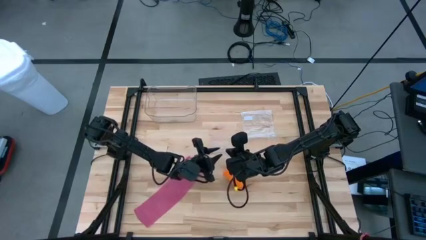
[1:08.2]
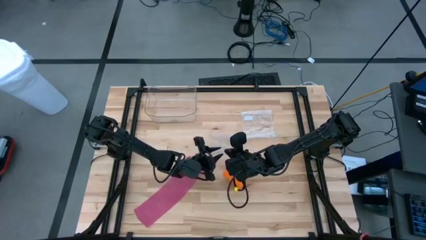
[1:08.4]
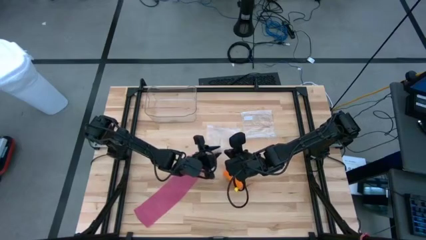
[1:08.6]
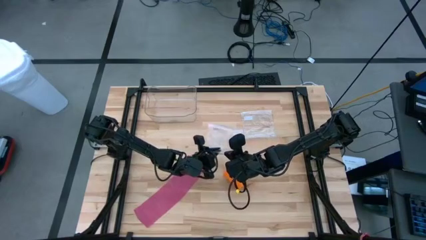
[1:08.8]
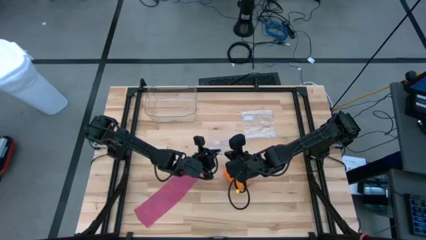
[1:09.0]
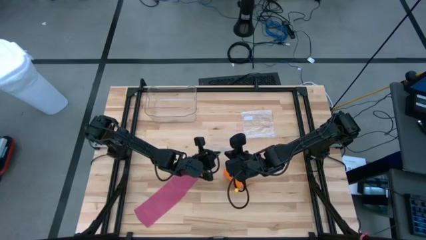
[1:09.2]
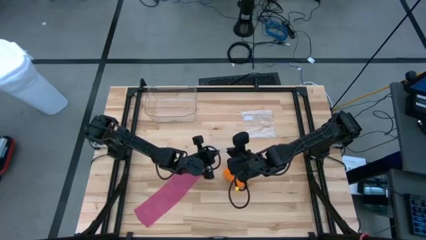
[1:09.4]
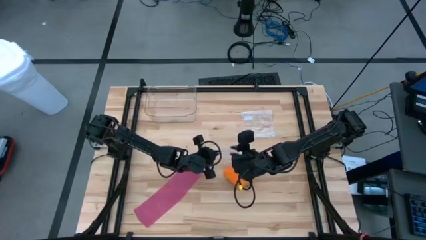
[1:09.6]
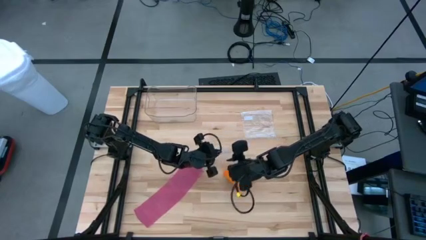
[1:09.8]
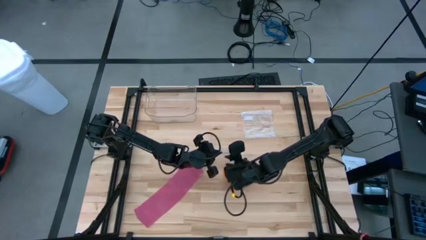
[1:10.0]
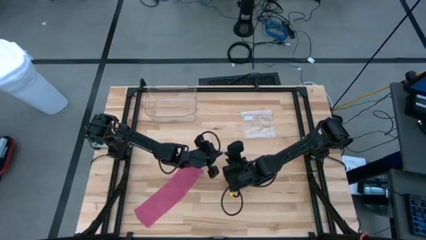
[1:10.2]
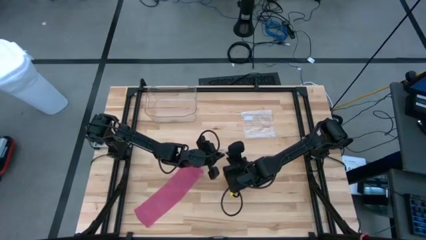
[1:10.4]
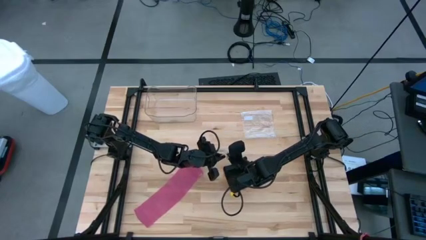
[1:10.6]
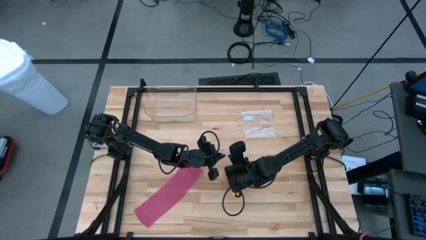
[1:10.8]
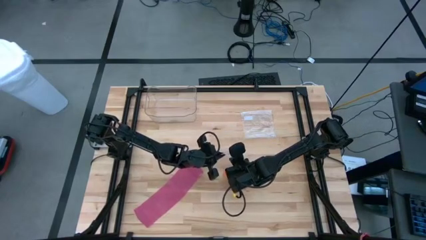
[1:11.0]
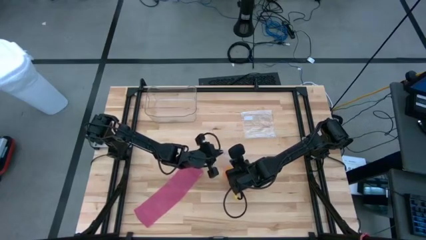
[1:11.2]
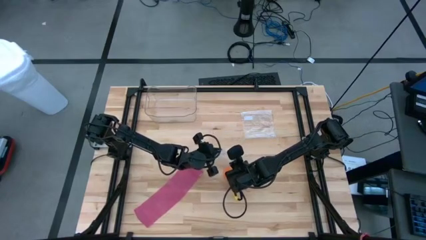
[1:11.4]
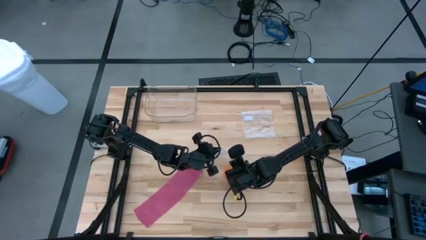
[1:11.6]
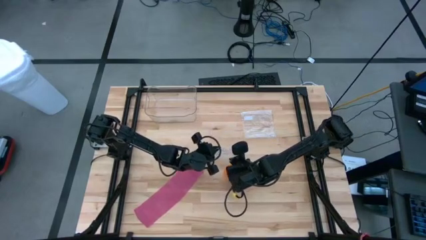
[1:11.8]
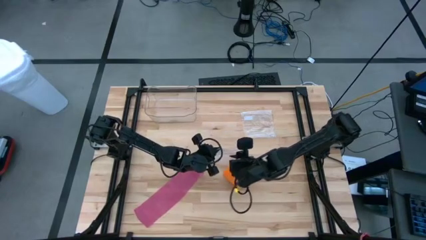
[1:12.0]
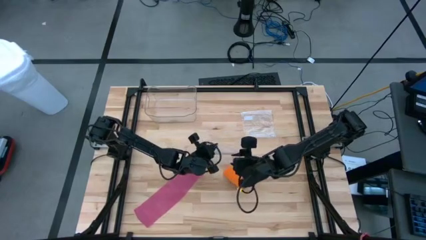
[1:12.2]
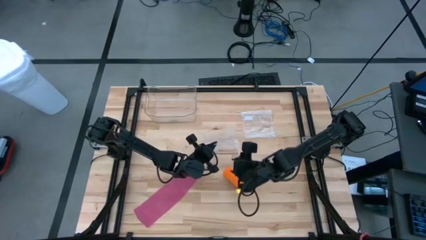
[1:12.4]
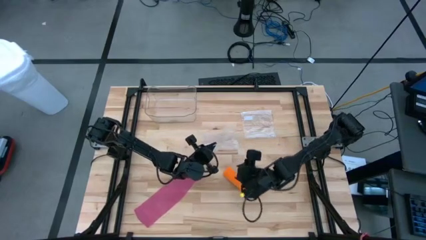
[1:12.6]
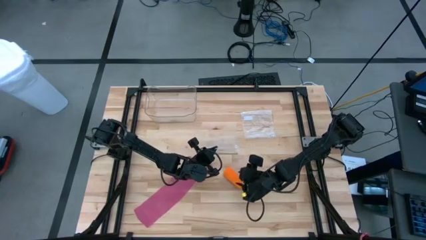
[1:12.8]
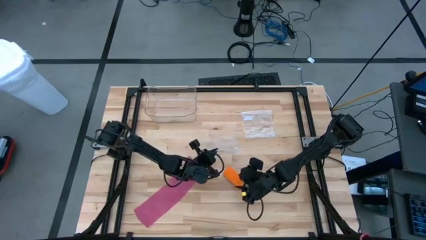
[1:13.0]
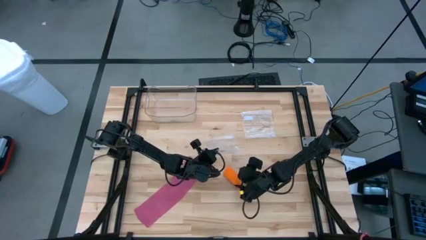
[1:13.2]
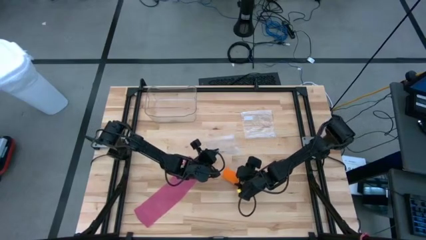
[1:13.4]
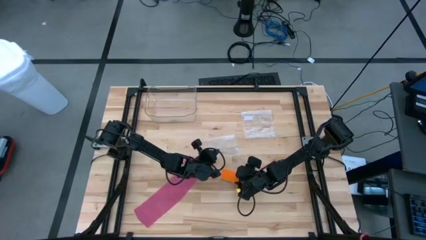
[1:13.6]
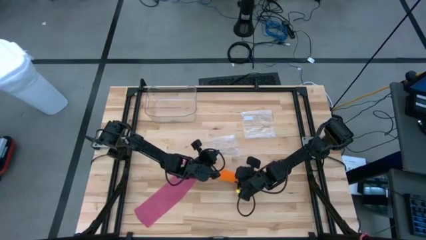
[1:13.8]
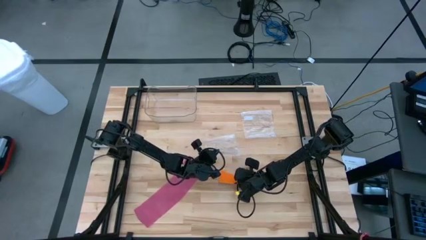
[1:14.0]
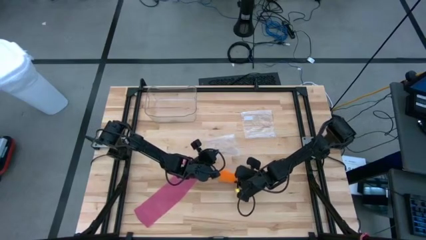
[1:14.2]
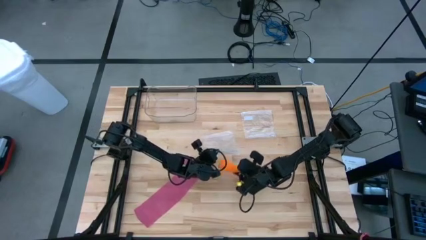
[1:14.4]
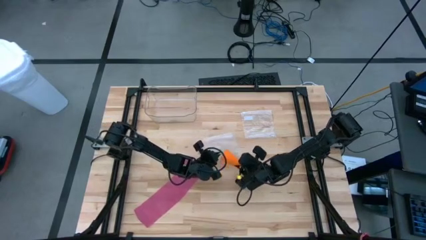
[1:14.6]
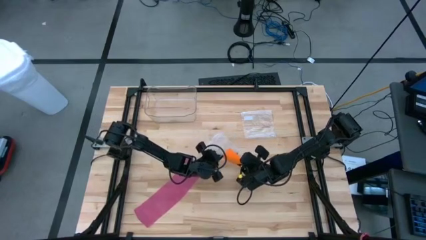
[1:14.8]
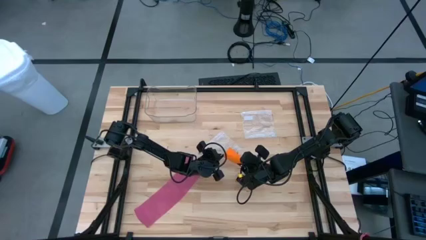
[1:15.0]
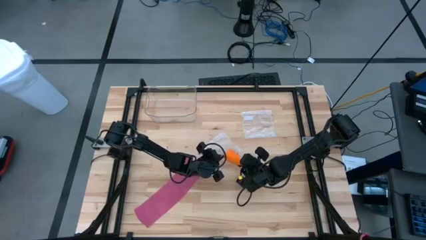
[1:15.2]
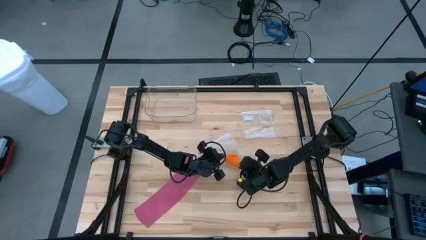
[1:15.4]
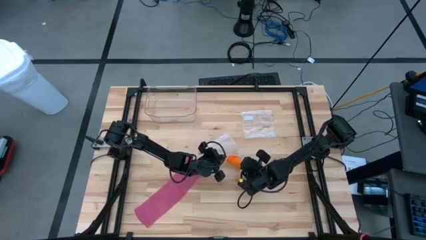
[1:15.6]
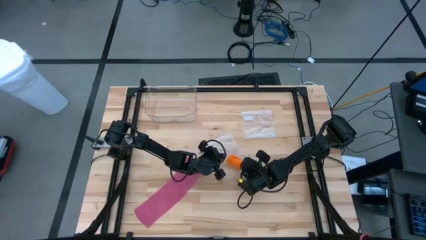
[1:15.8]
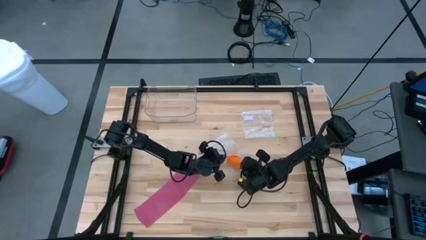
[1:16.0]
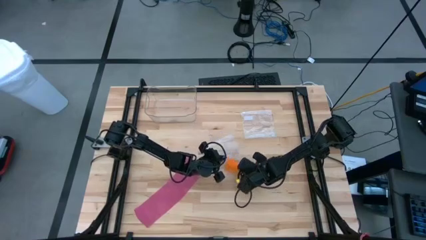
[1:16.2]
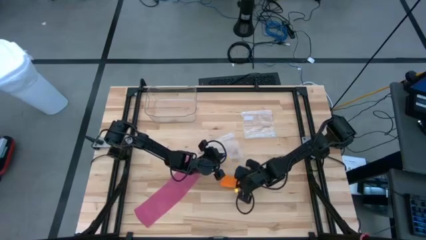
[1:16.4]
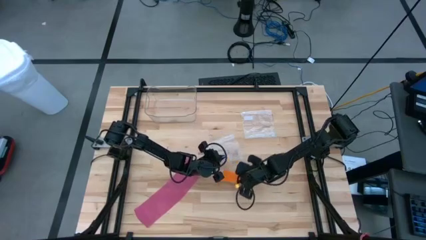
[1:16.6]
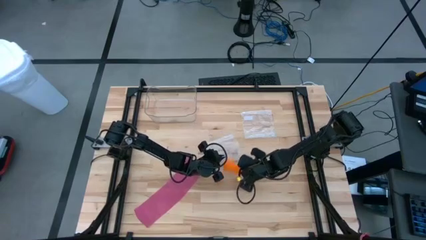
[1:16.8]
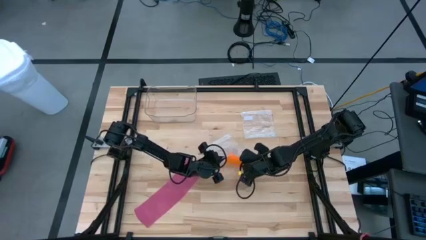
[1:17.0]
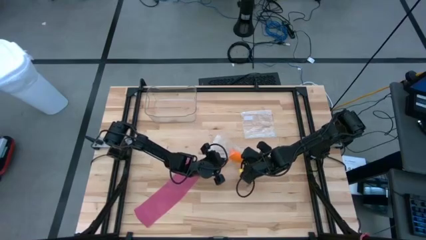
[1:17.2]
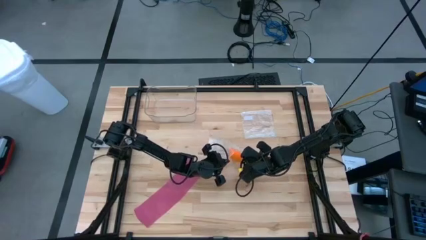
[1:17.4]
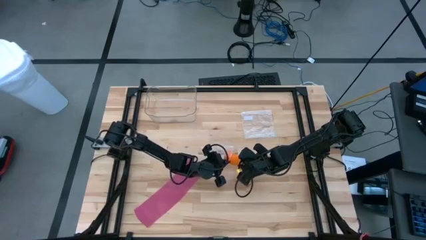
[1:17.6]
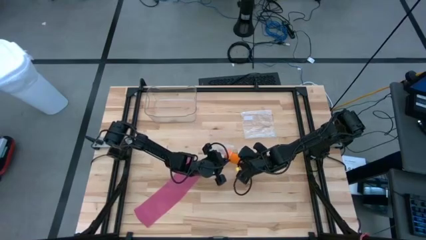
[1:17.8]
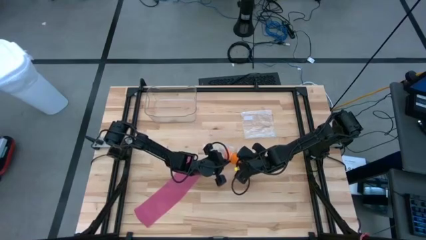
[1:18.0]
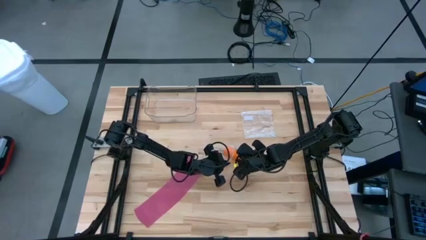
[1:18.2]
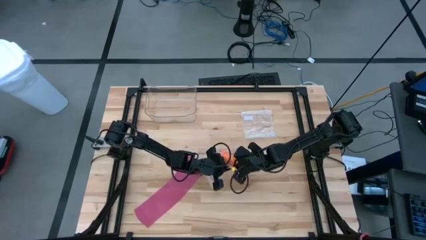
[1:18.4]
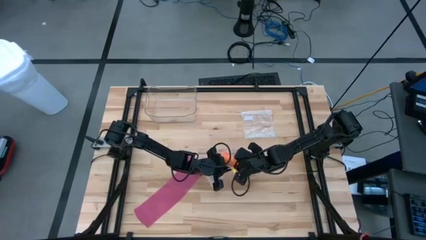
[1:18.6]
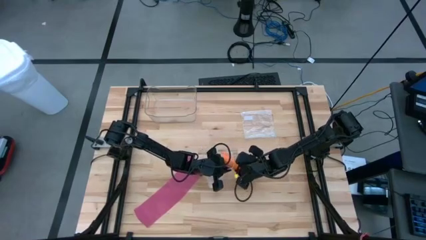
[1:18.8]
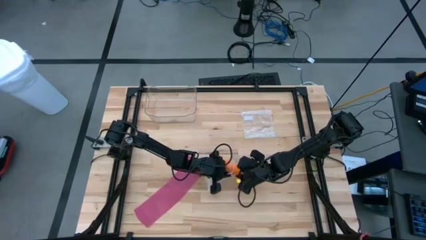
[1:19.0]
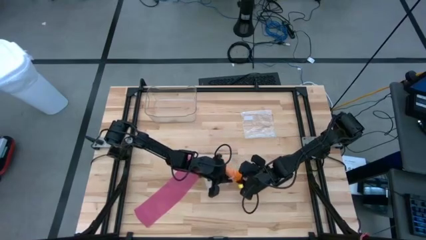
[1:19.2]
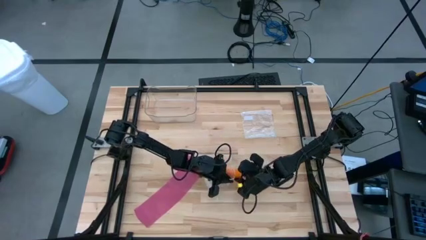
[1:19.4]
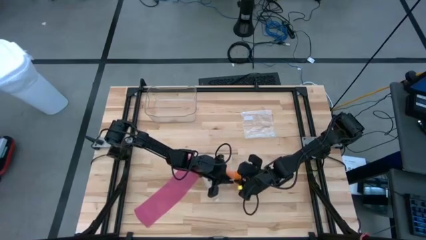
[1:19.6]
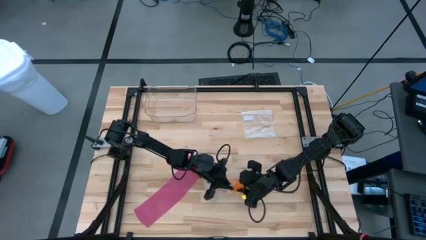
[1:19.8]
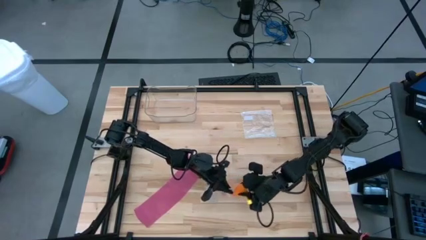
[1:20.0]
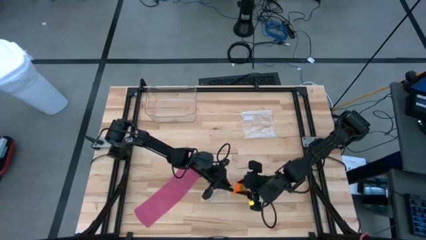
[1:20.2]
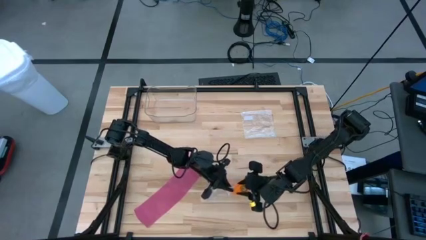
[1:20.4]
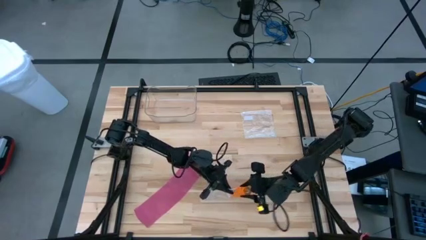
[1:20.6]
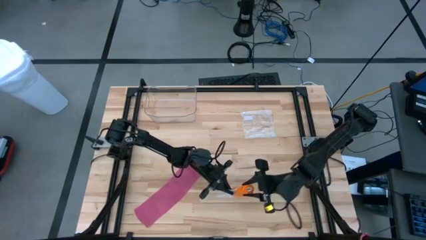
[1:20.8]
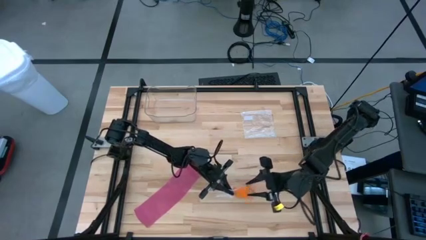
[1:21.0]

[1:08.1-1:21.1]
Task: Roll bandage
Put the rolled orange bandage into the transparent zip bag

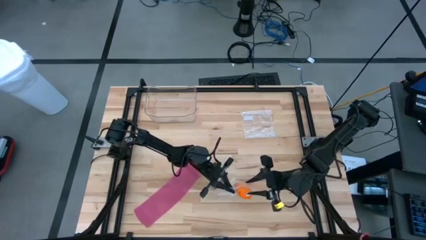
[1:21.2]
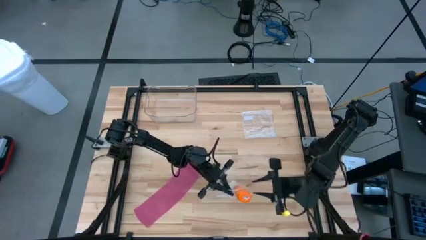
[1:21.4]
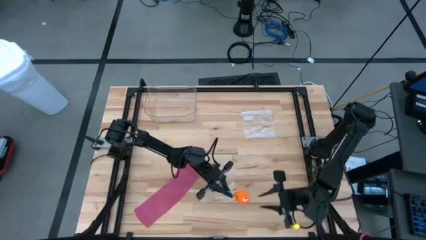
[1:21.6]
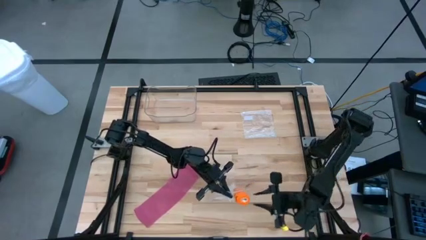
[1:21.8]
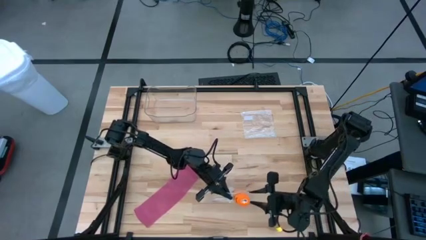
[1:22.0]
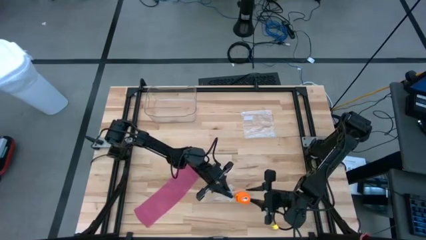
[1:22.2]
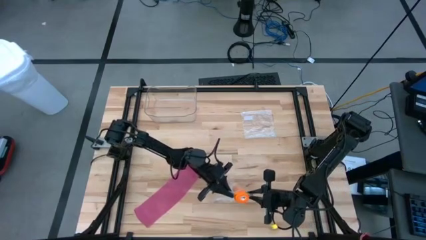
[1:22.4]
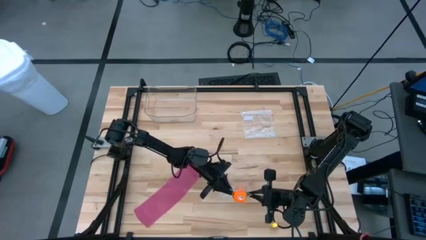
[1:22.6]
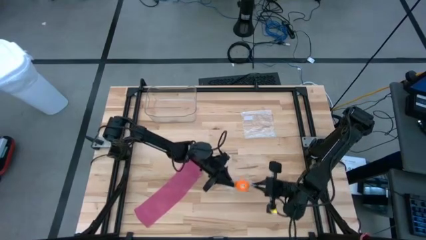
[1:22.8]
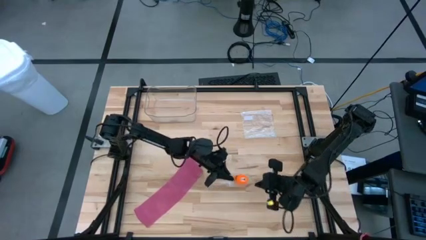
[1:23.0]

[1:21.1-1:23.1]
Put the rolled orange bandage into the transparent zip bag
